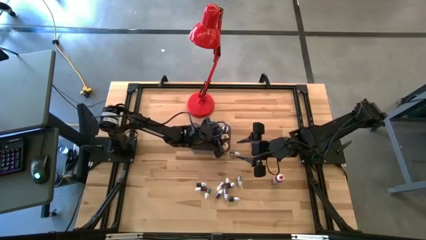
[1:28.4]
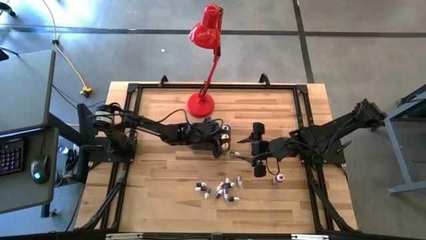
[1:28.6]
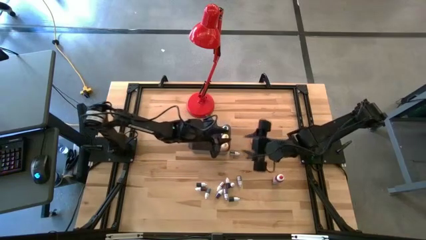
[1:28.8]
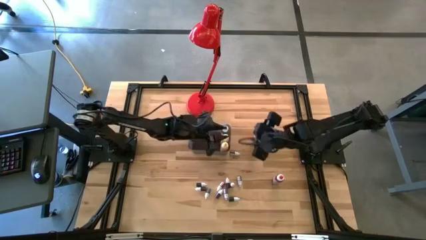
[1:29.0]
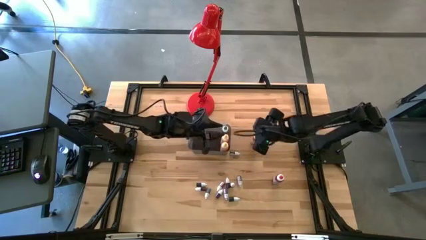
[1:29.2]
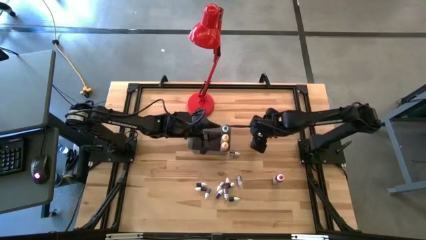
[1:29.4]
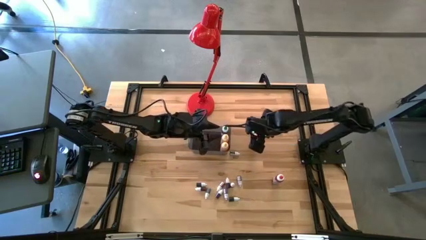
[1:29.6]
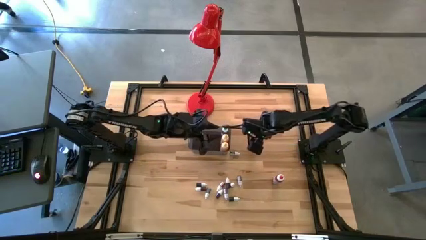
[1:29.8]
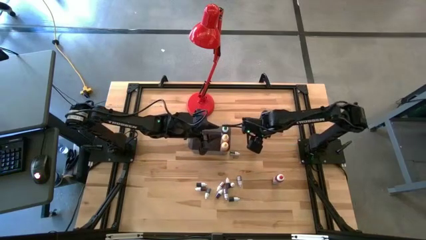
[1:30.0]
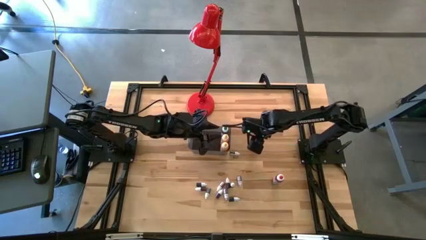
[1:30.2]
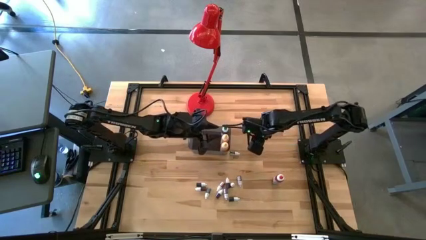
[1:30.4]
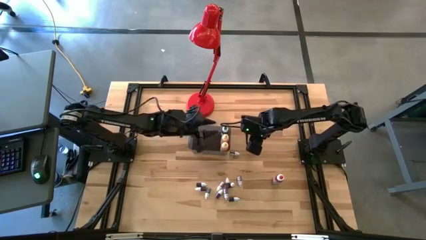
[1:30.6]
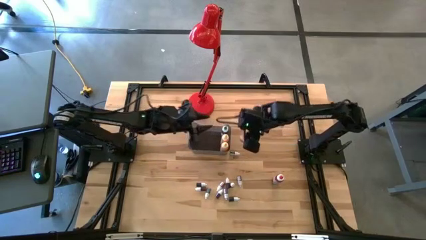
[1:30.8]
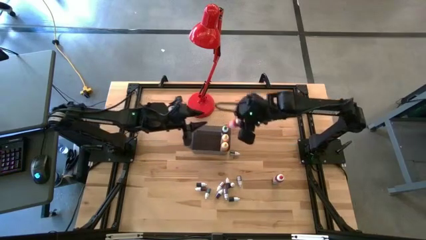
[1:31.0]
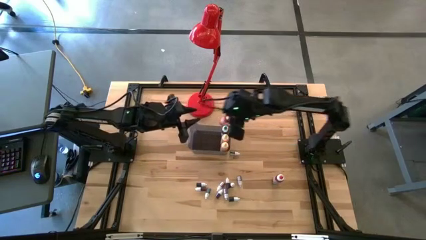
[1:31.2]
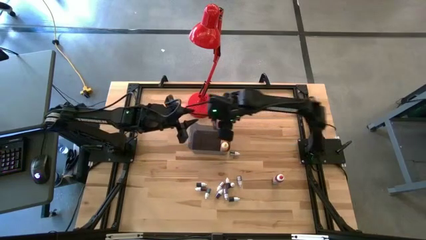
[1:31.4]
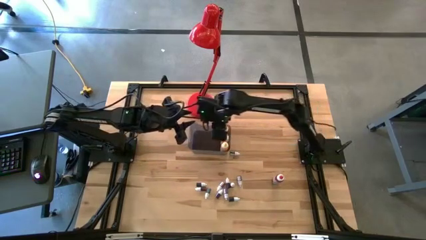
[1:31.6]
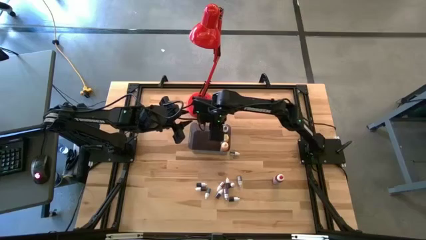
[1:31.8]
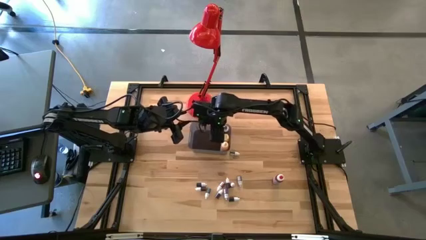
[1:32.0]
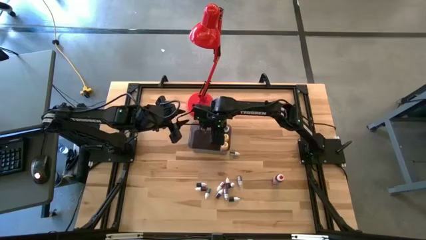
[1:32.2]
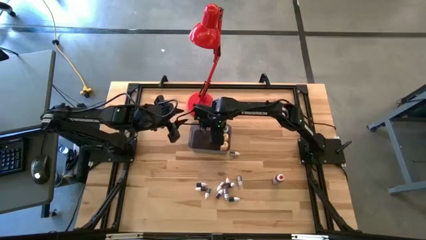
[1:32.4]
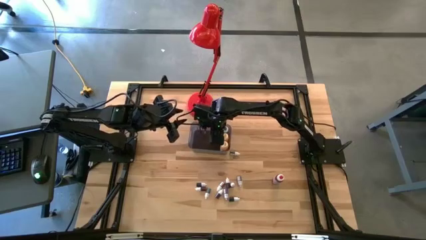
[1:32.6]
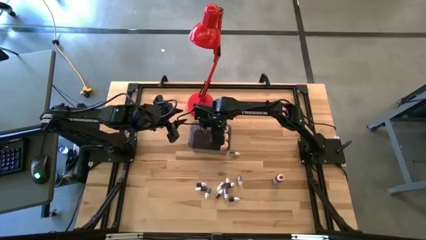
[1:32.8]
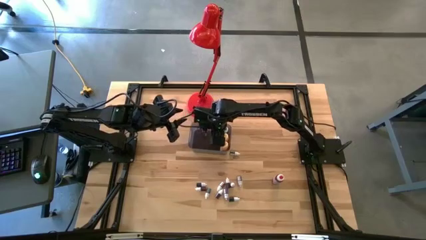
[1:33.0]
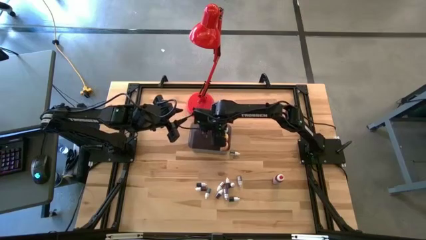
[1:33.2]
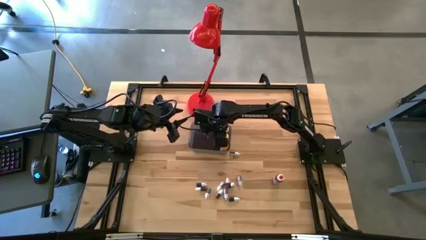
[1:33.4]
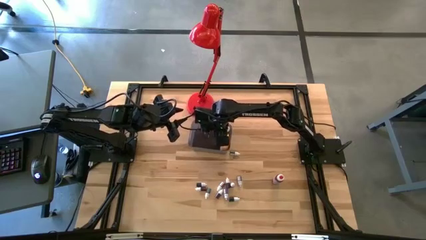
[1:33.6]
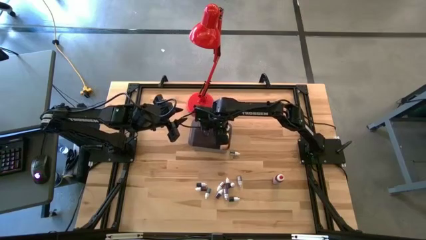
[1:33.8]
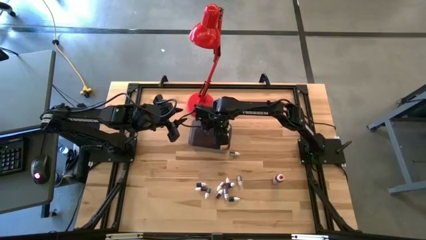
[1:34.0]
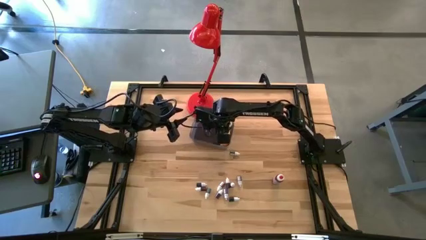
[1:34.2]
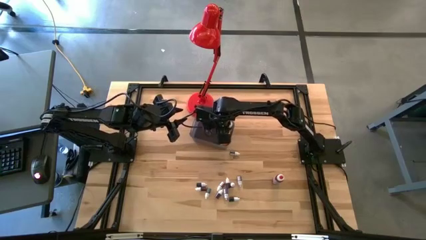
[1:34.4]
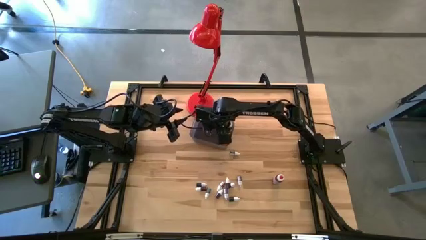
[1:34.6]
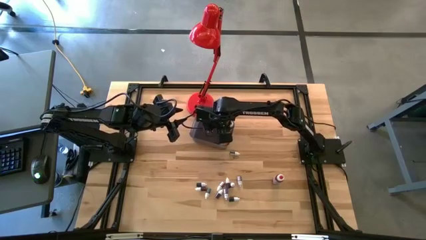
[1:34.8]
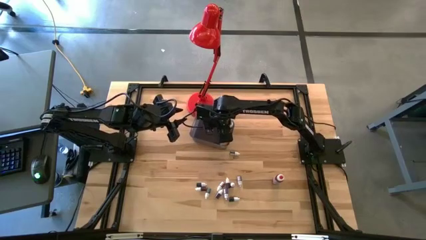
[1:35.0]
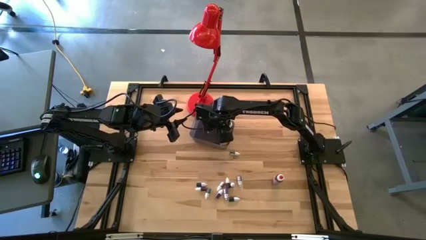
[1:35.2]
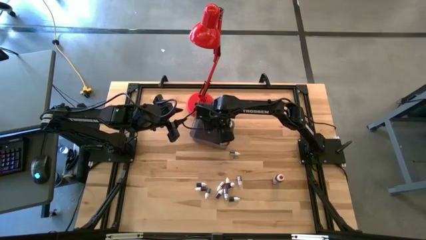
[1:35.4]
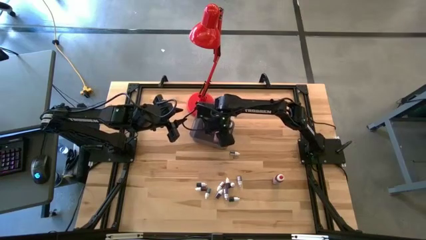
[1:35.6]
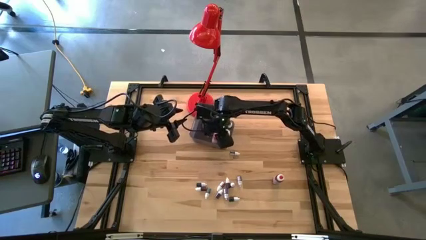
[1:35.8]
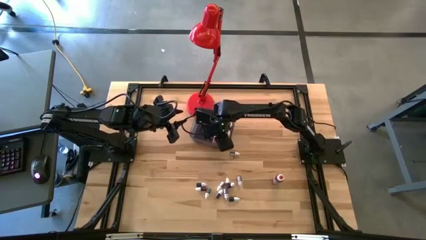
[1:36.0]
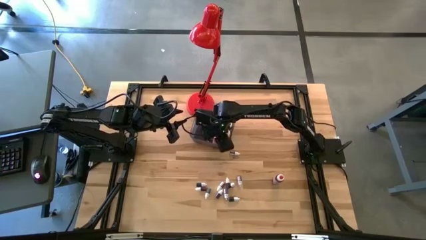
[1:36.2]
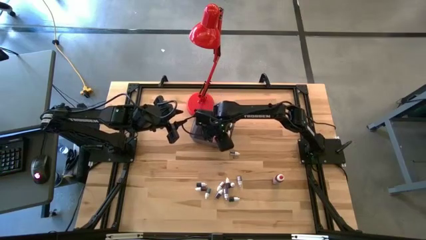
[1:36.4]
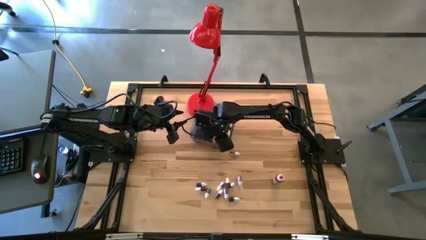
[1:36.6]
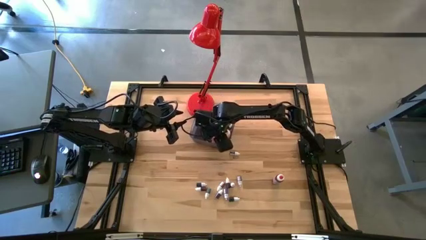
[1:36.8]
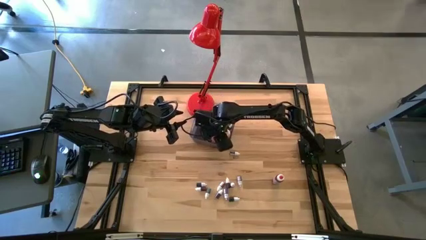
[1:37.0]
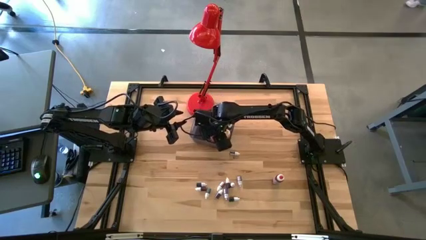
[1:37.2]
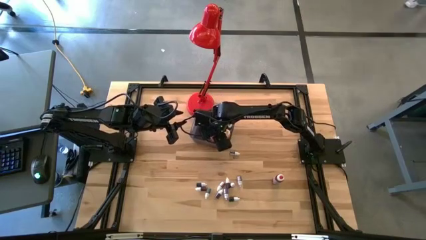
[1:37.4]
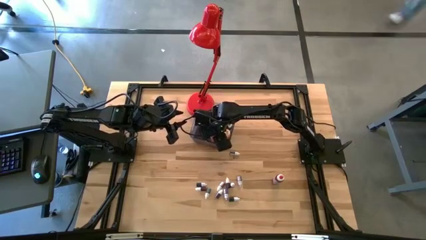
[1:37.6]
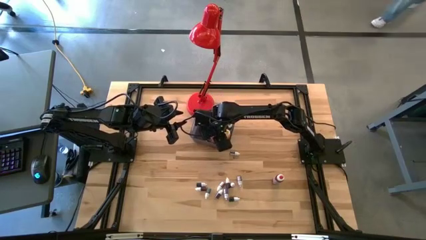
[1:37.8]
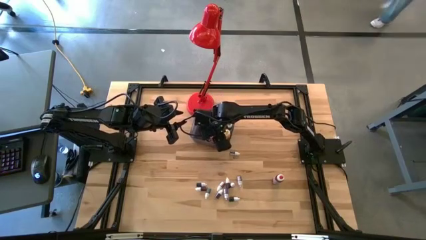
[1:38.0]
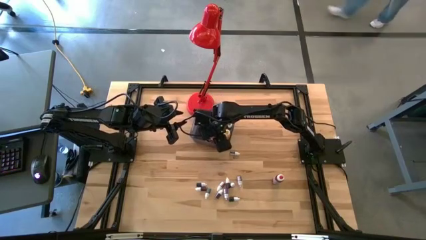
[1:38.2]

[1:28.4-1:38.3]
Task: Pick & Place food coloring
Put the large orange food coloring bottle into the black bin

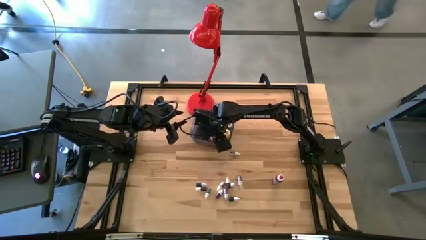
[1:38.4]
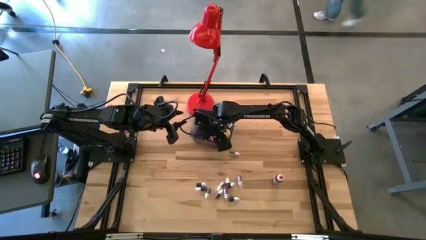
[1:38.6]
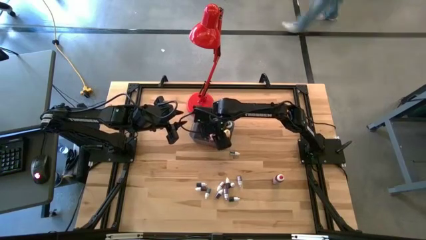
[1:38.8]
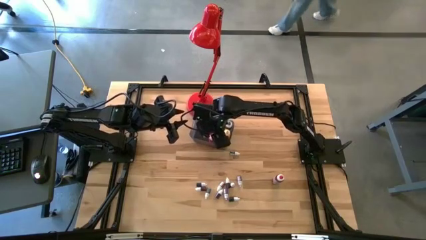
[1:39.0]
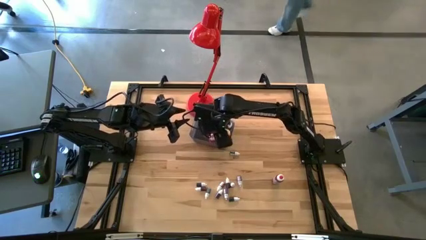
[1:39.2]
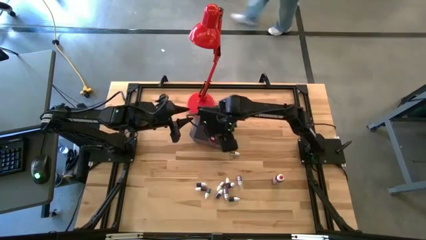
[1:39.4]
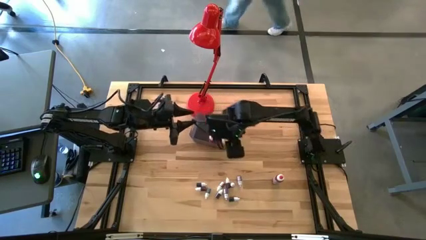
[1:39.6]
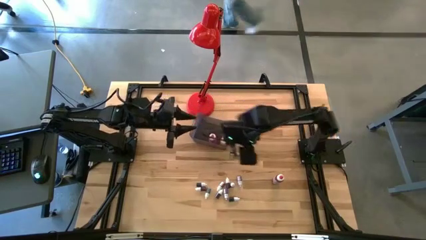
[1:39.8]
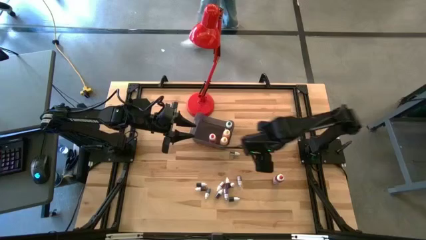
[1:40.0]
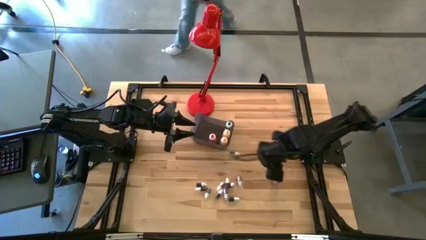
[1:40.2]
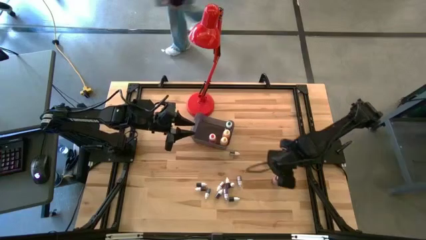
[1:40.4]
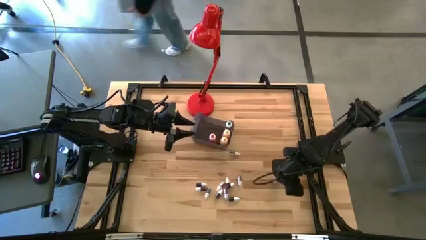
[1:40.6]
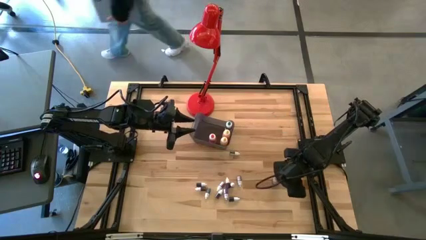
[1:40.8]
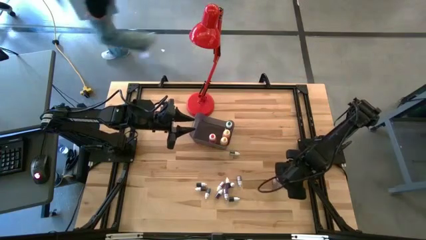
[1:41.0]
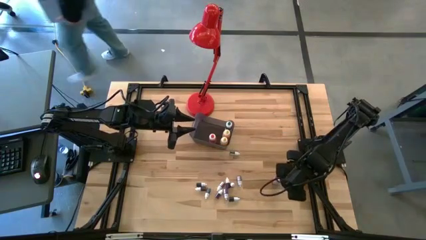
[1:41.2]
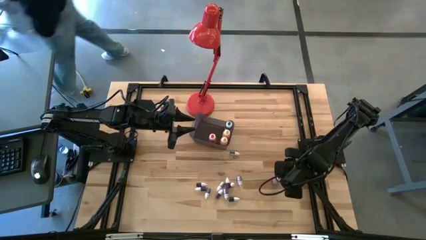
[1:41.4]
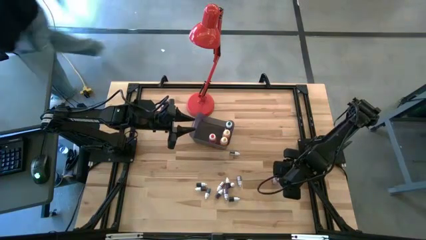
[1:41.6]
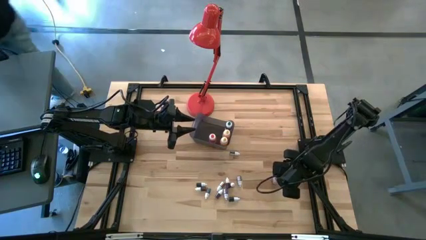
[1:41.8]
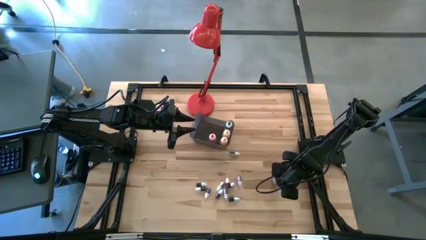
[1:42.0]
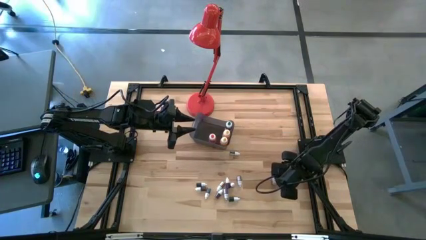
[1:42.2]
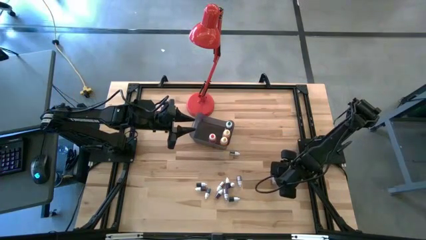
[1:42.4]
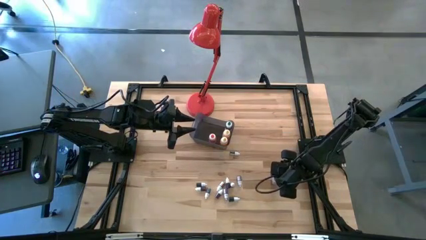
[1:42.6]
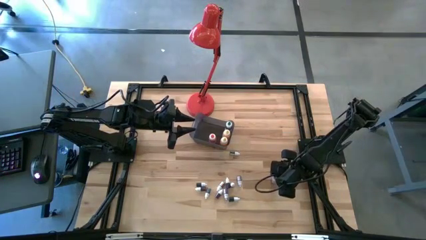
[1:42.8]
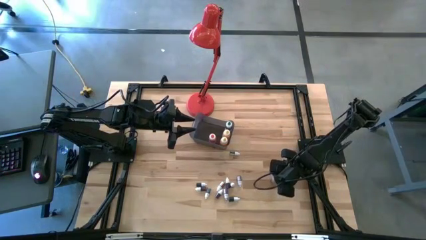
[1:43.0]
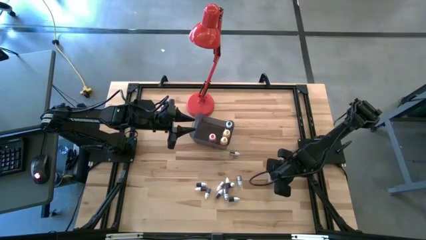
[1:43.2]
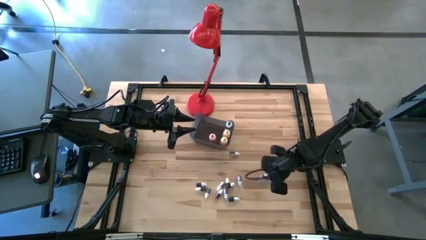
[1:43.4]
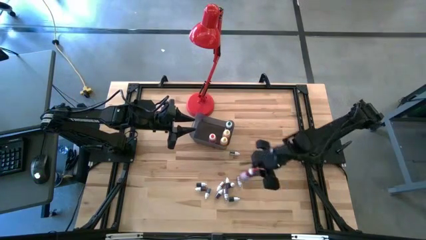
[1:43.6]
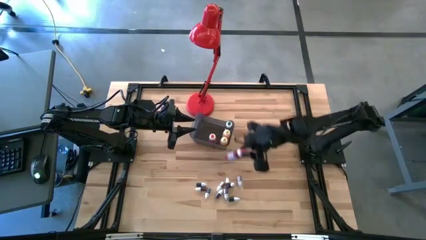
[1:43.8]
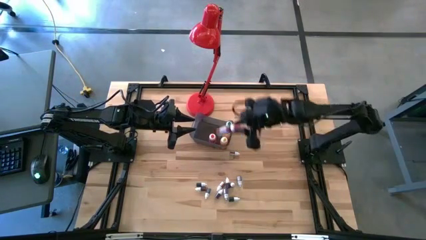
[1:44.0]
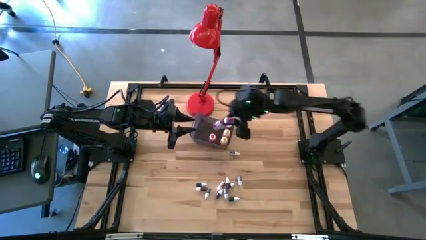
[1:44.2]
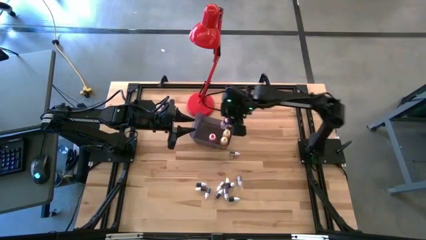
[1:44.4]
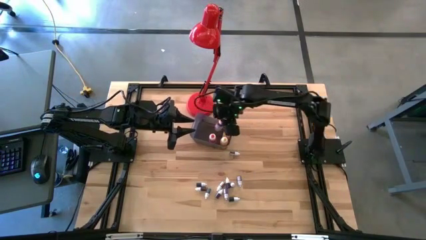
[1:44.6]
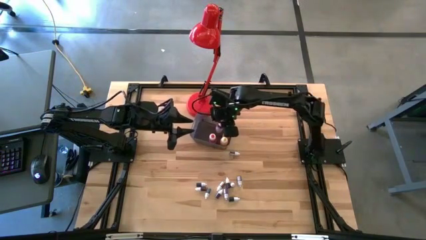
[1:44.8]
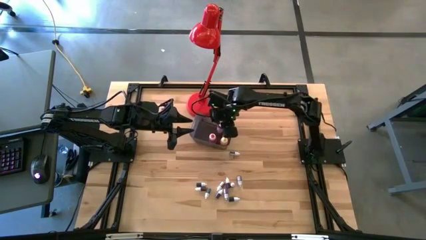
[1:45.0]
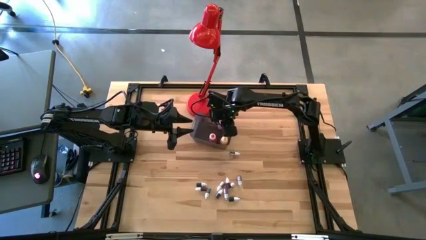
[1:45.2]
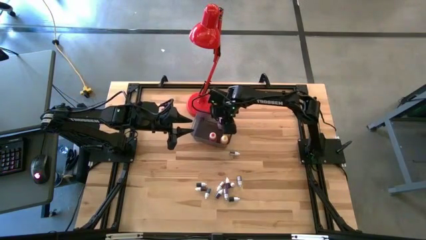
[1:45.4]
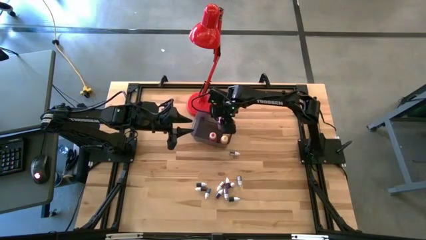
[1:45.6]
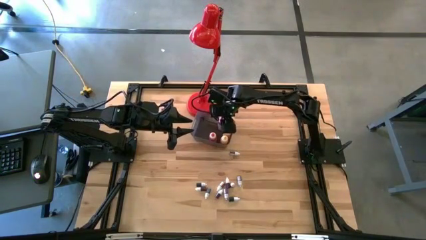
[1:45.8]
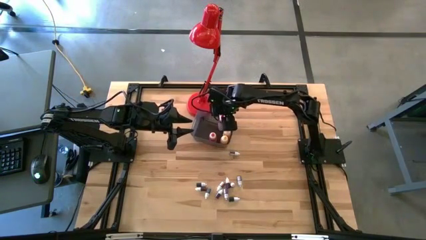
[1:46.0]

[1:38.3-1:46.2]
Put the large red food coloring bottle into the black bin
